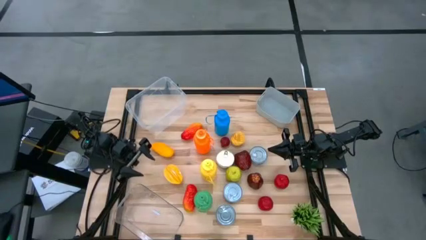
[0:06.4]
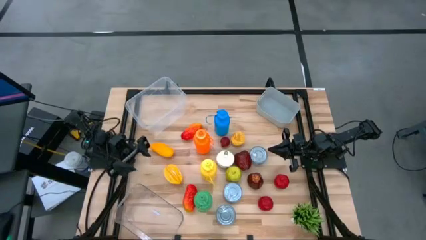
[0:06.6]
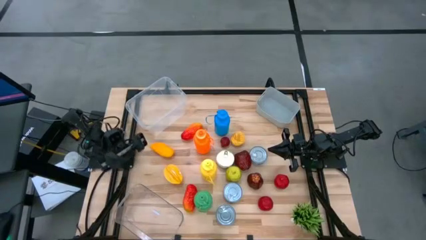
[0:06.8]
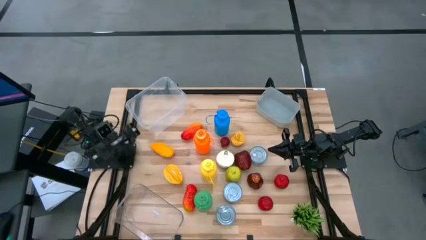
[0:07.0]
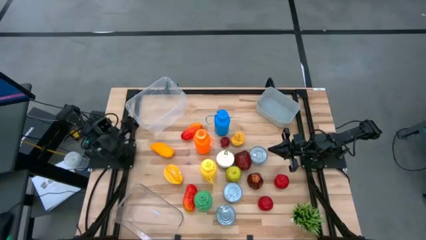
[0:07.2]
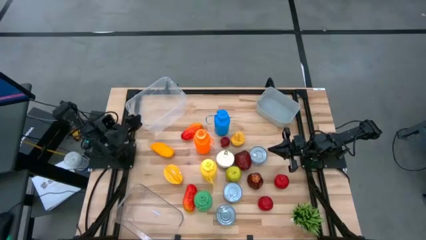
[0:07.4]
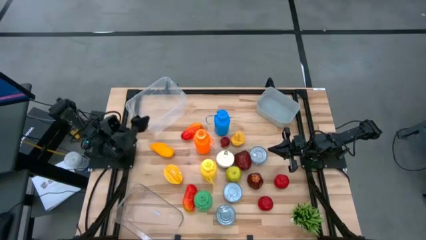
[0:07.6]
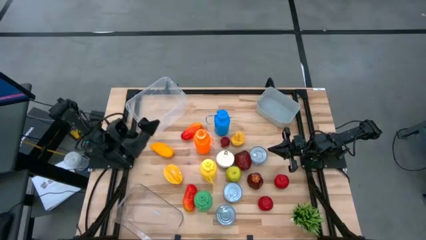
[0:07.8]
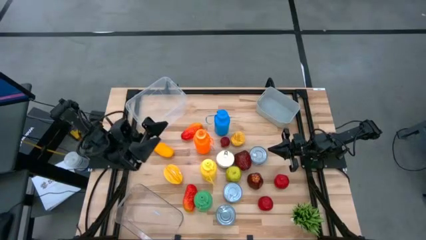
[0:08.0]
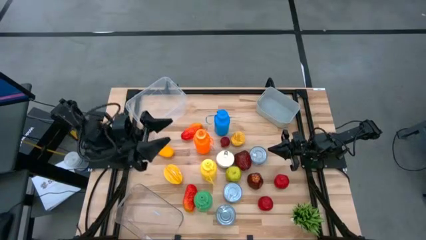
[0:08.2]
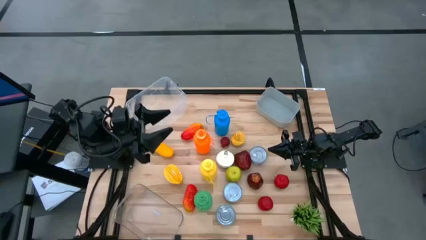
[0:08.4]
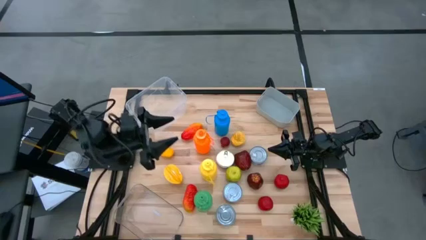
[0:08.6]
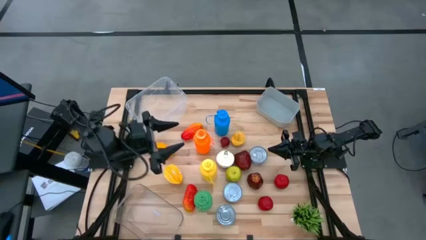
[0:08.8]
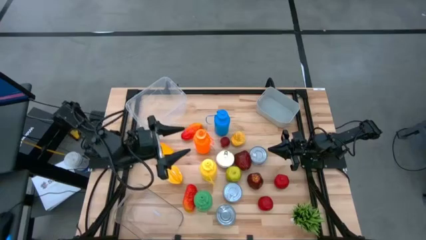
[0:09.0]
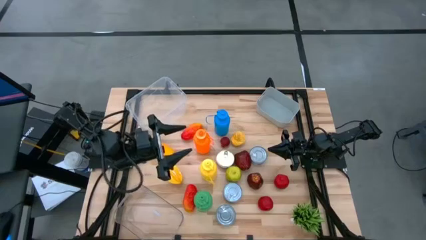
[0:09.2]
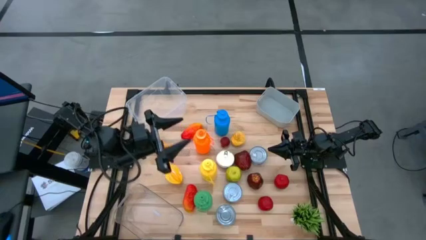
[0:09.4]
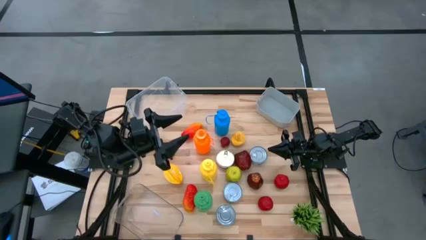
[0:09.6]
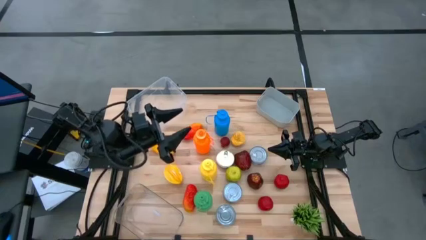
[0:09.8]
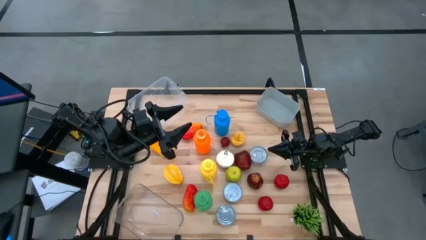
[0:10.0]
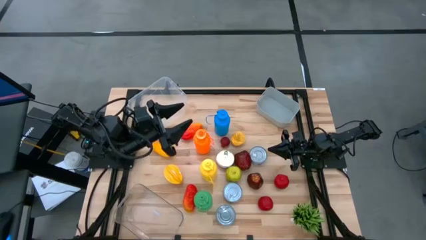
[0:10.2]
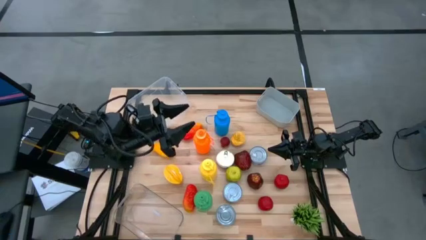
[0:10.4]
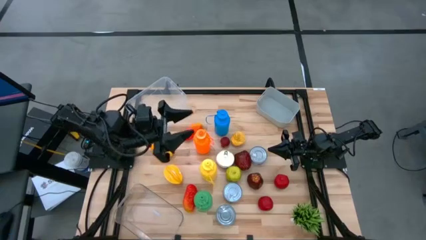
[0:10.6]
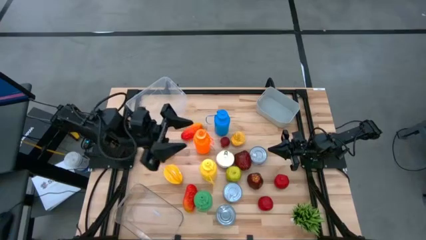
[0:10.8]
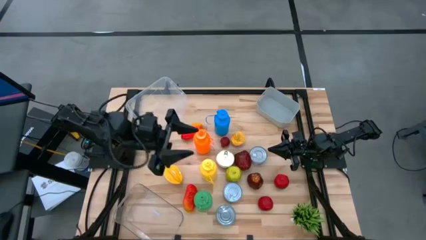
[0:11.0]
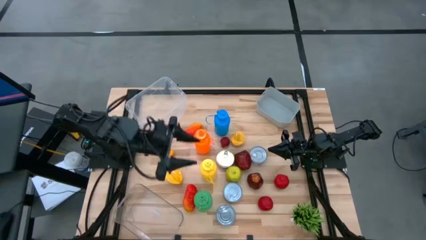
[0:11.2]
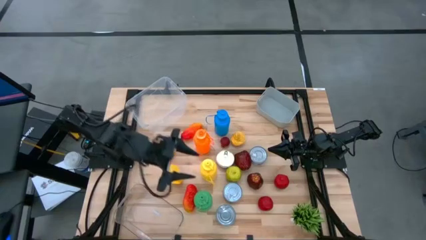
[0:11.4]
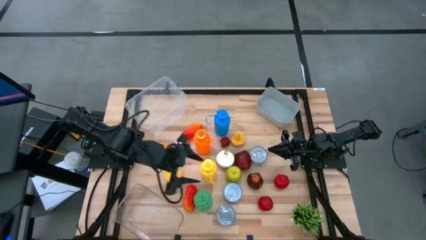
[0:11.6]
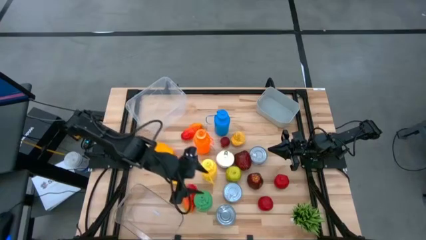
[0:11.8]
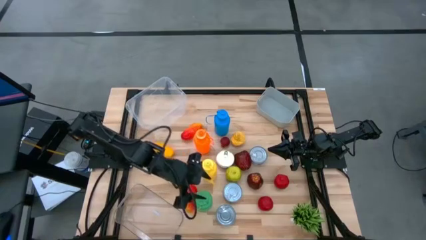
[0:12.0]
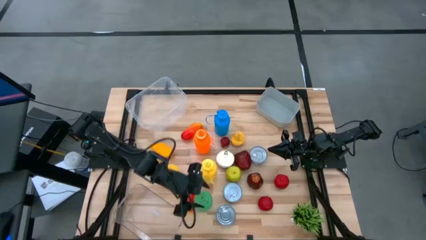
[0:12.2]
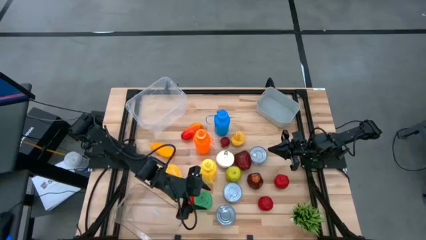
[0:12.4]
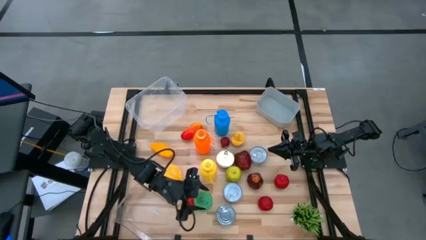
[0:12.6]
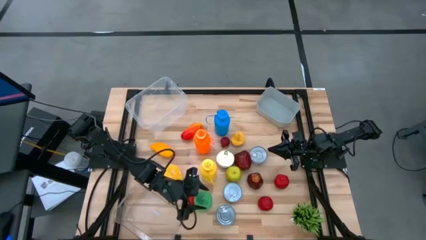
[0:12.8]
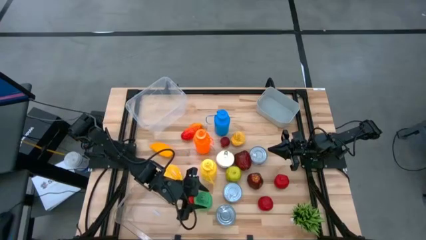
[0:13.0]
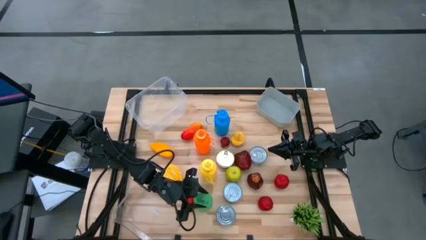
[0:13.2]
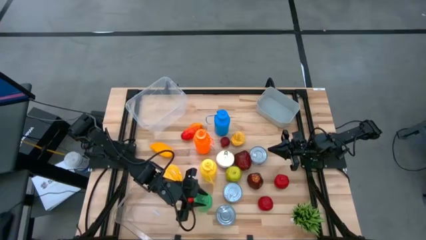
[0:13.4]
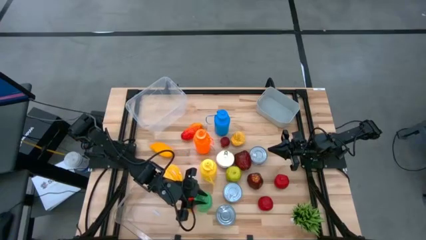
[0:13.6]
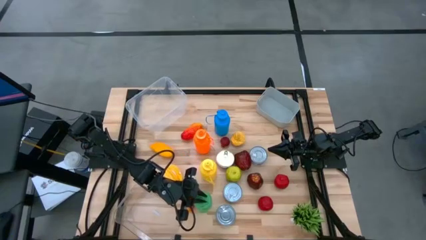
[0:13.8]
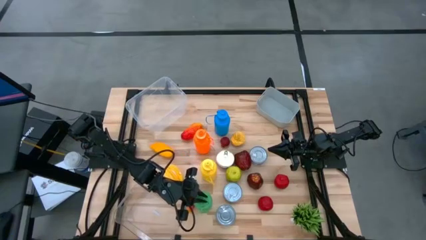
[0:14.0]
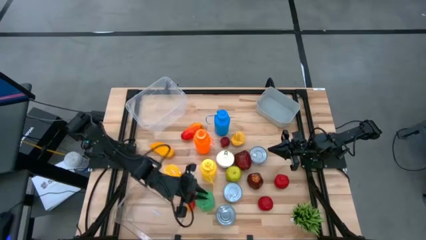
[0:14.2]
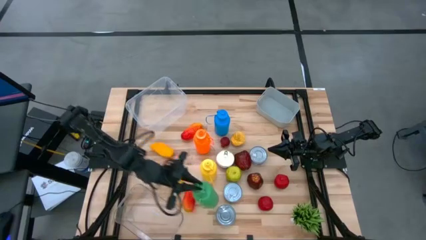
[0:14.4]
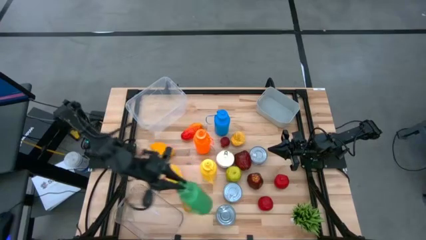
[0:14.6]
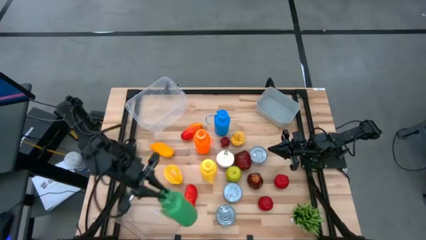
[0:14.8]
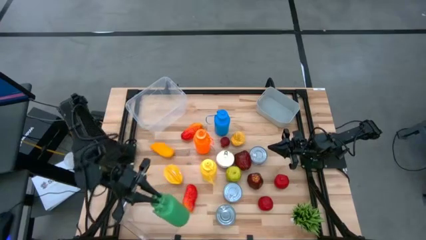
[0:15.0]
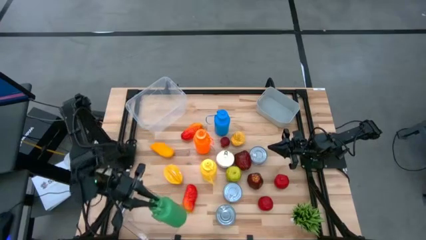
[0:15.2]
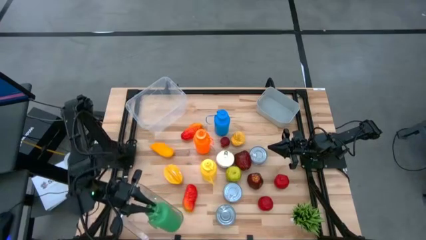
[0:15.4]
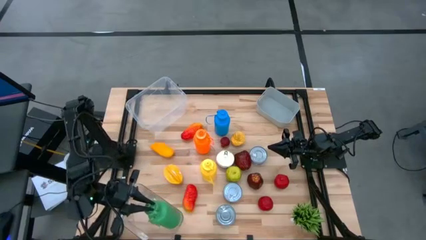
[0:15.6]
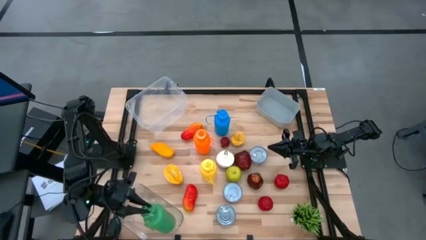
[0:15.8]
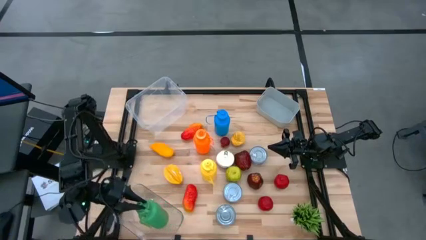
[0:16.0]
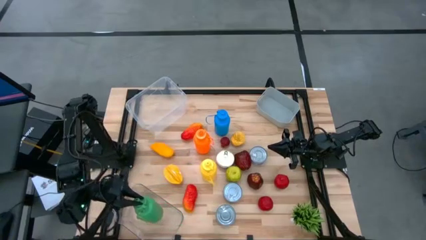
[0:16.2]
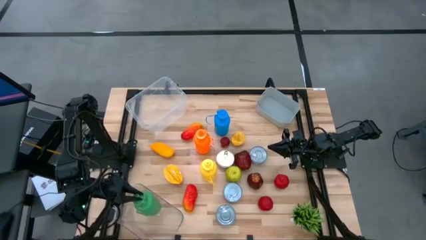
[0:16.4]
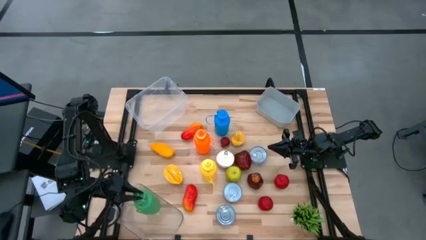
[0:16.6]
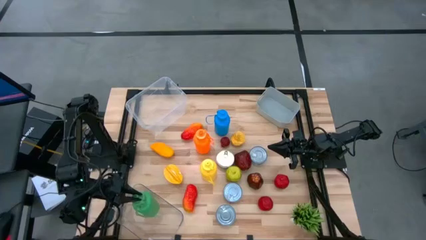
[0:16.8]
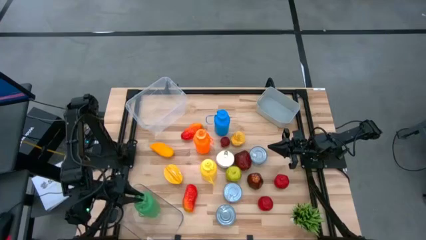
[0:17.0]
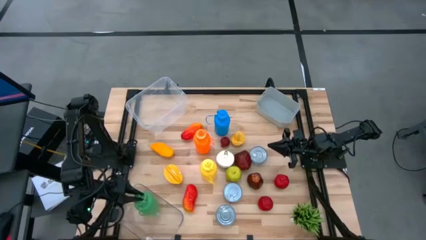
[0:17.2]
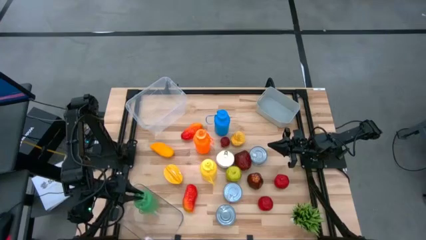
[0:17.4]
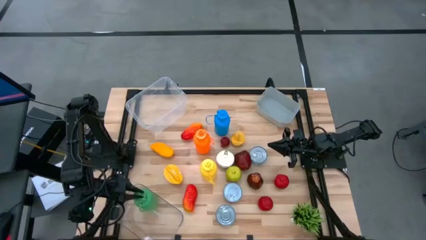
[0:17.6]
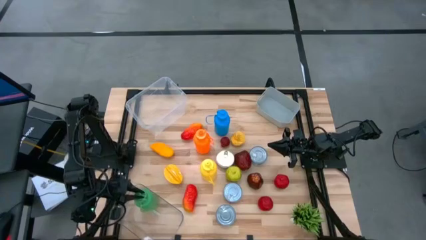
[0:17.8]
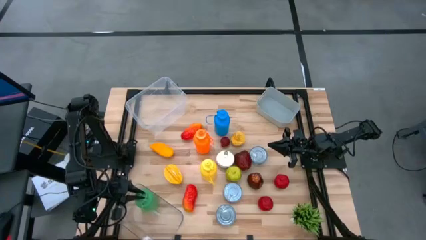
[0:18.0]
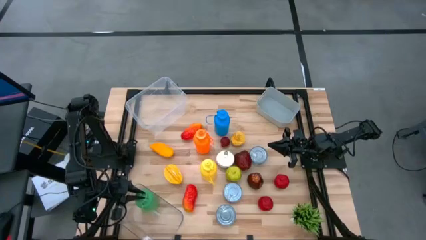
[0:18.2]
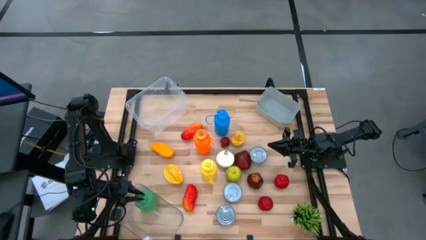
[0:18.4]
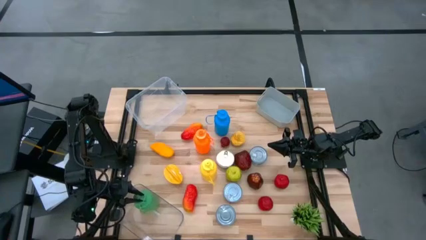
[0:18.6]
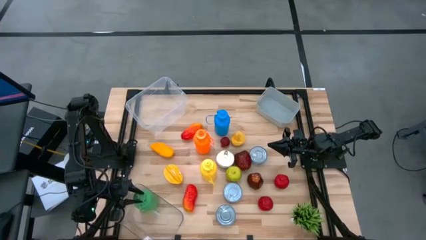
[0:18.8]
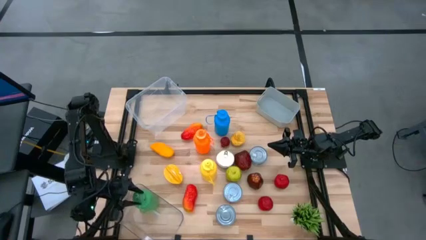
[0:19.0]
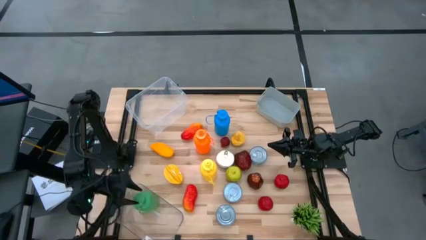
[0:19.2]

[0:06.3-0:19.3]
Task: Pick & Place Food Item
Put the green water bottle into the transparent bin
